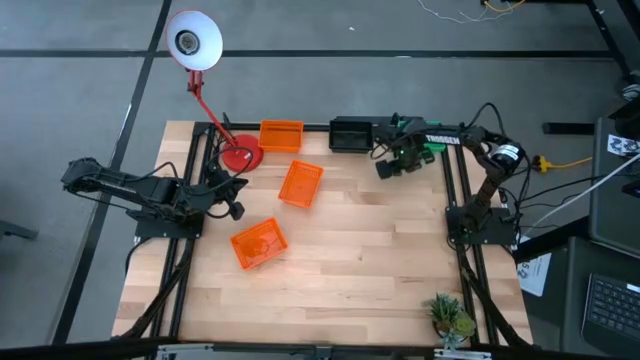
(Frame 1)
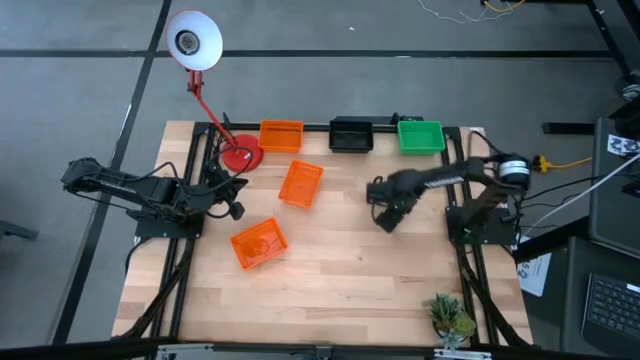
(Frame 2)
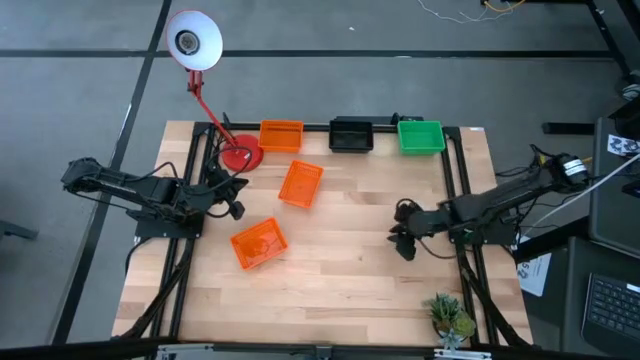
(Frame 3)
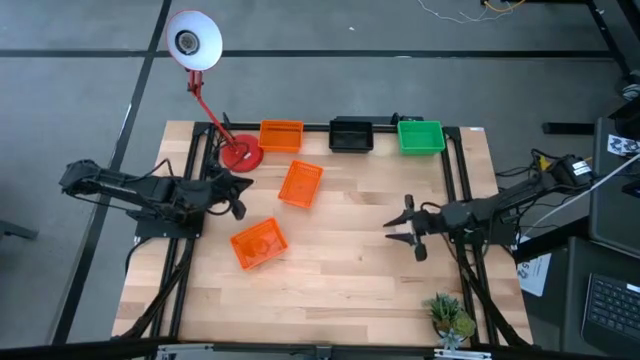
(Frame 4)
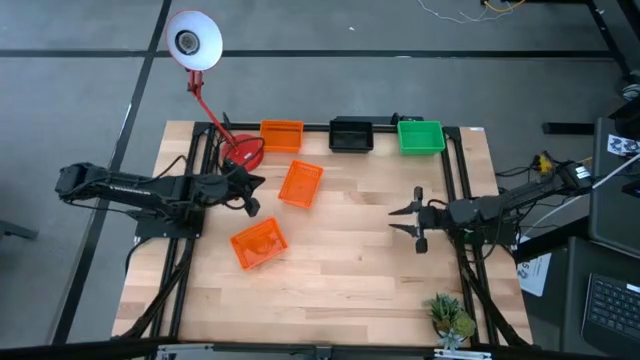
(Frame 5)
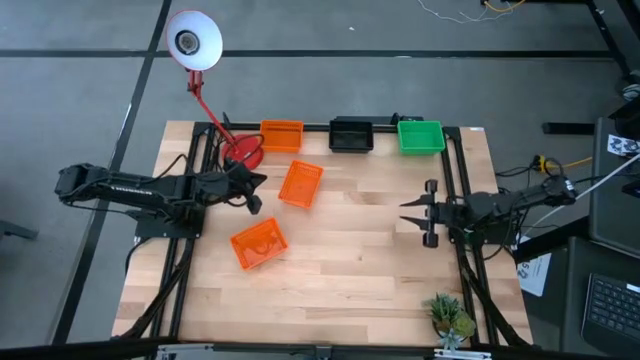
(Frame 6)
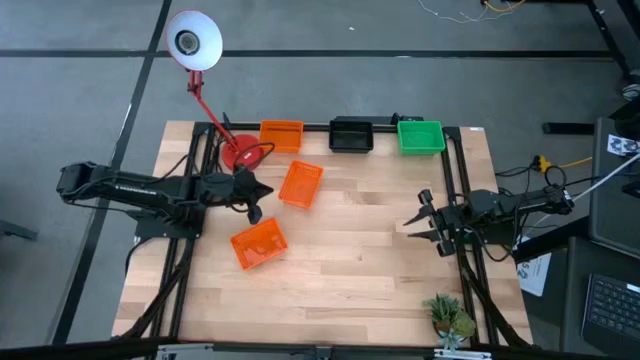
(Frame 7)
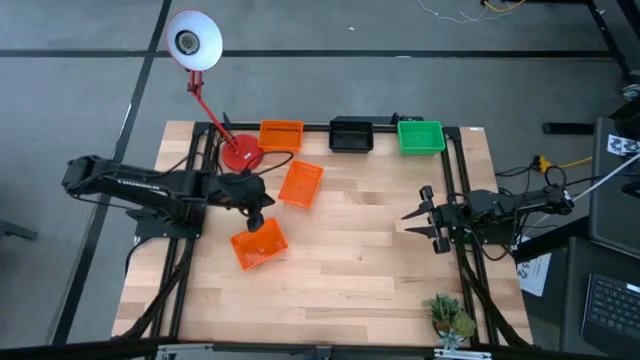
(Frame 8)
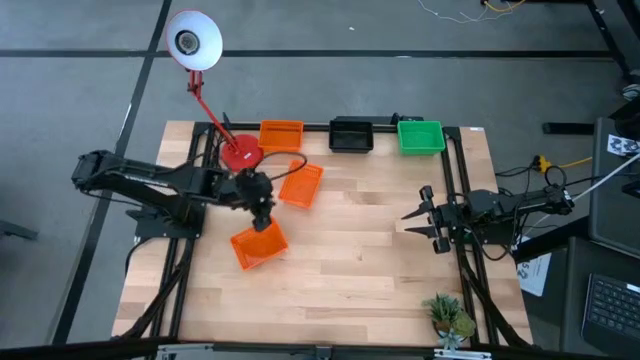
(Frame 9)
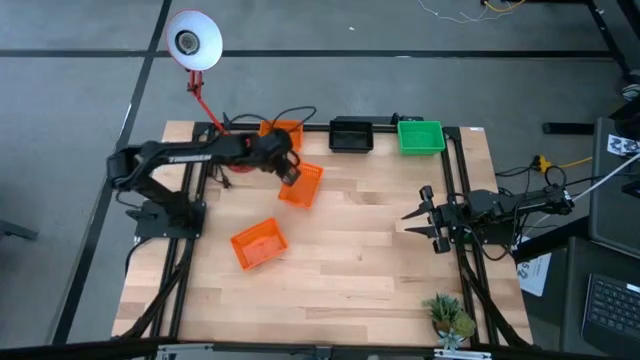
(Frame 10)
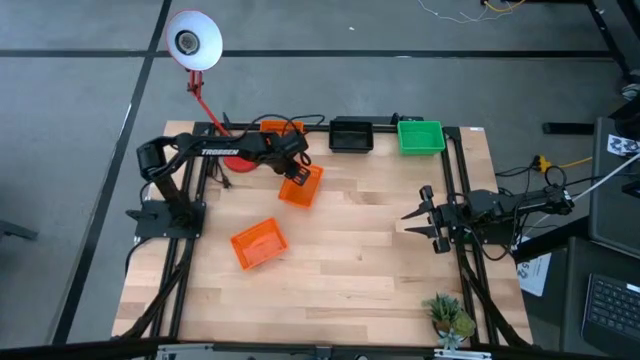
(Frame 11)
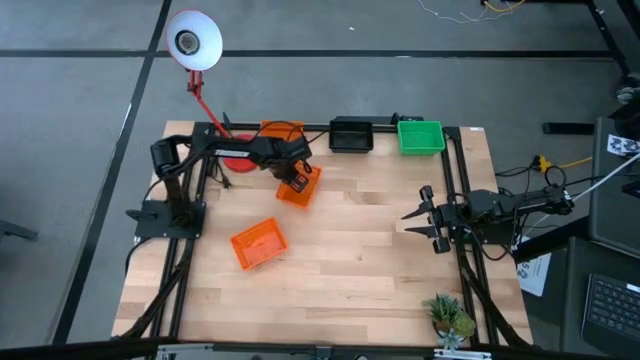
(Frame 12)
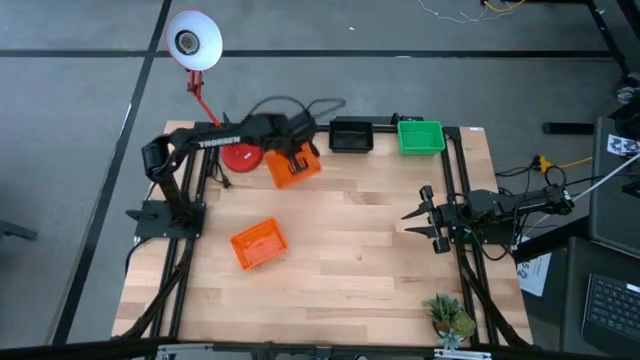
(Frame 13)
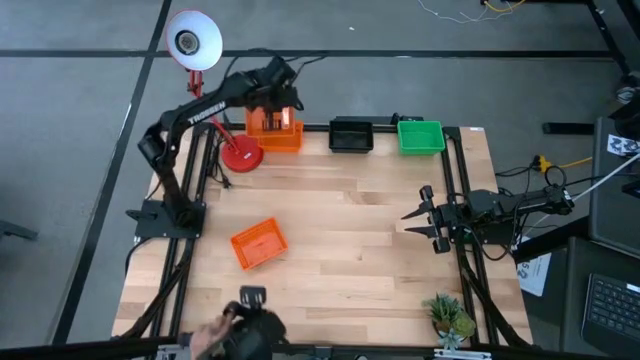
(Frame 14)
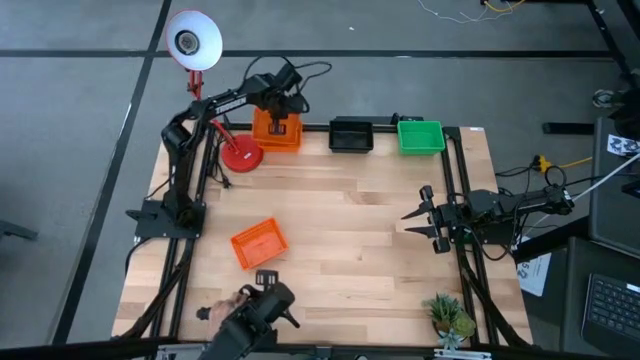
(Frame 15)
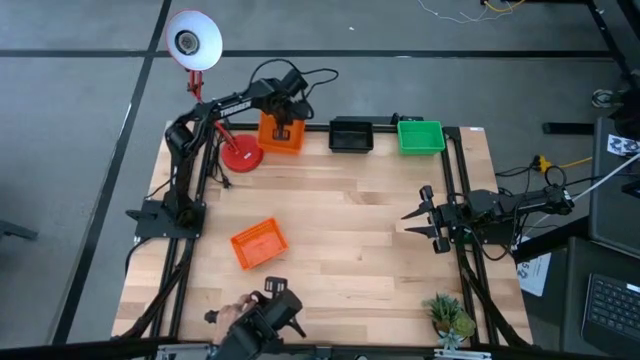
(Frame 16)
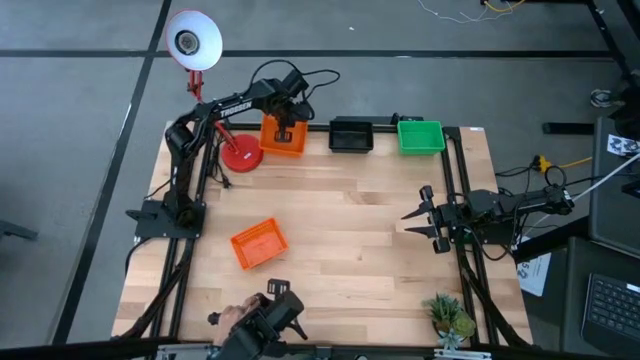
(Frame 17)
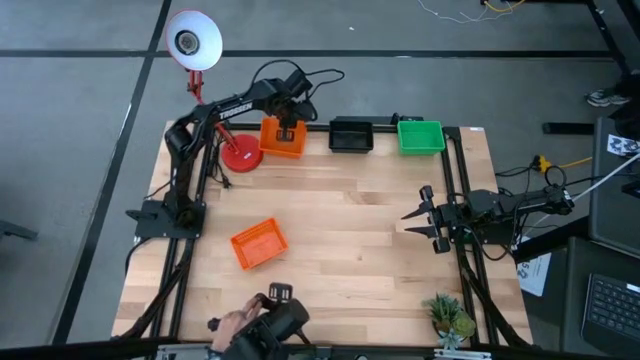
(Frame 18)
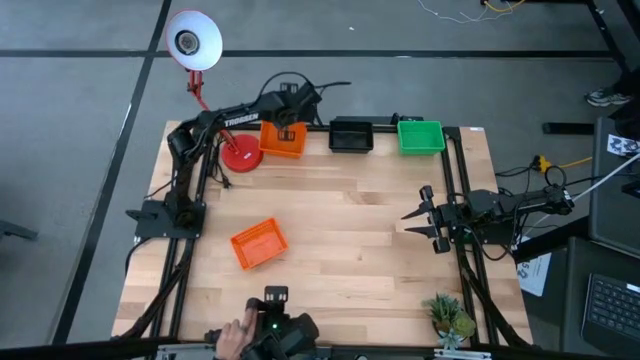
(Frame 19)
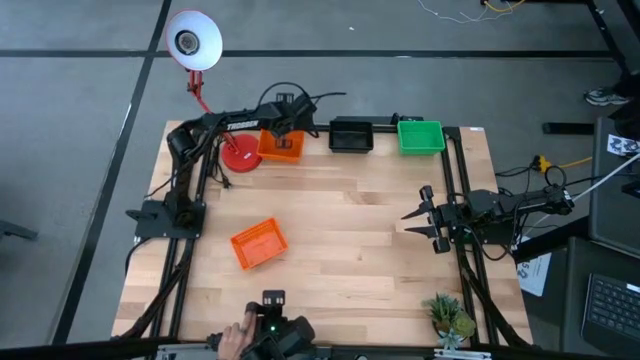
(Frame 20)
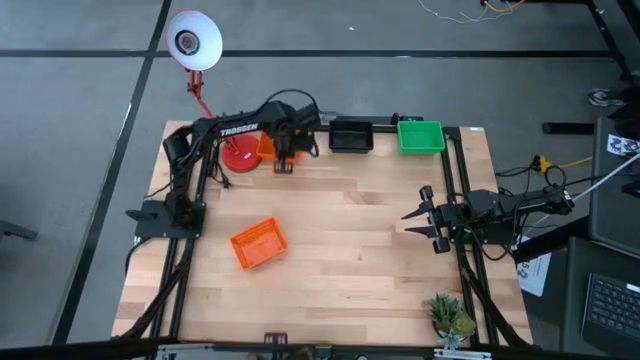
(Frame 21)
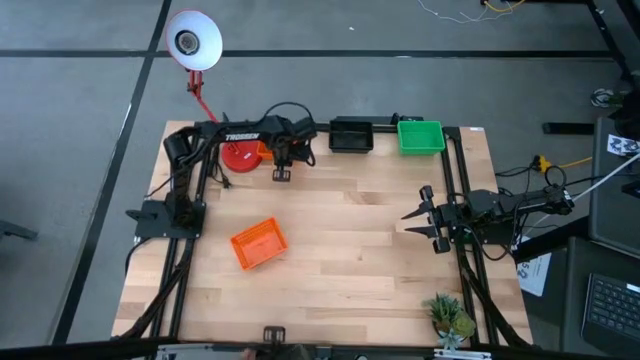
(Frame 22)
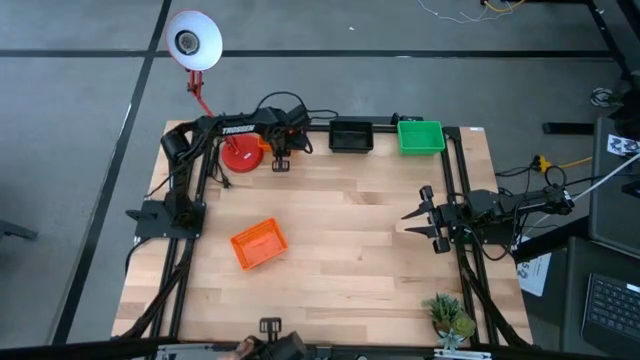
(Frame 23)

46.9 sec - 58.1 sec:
Stack the middle orange bin on top of the top orange bin

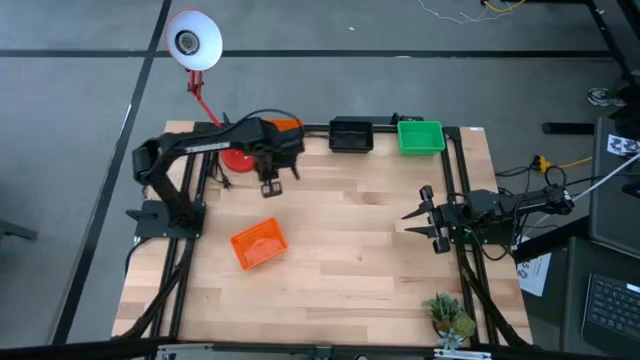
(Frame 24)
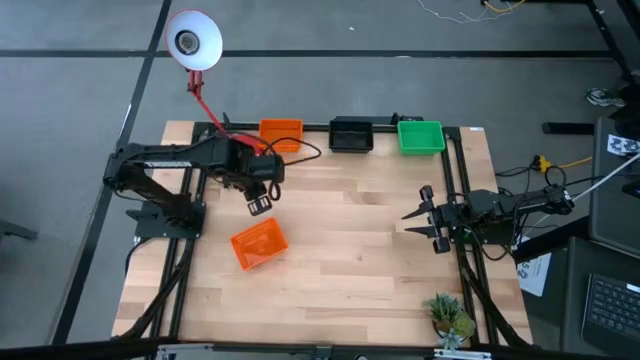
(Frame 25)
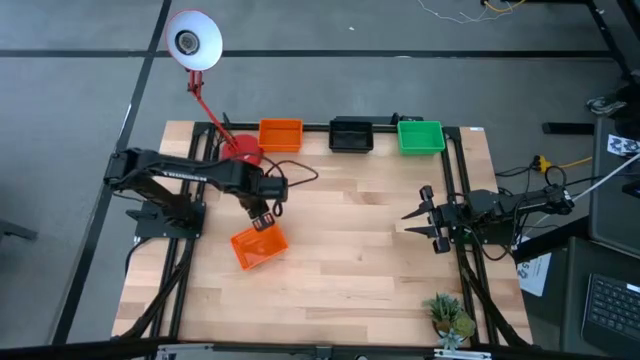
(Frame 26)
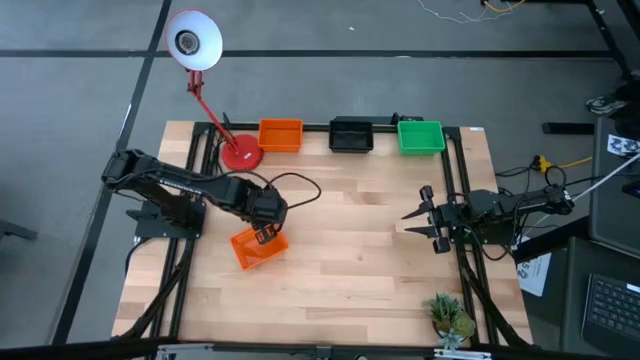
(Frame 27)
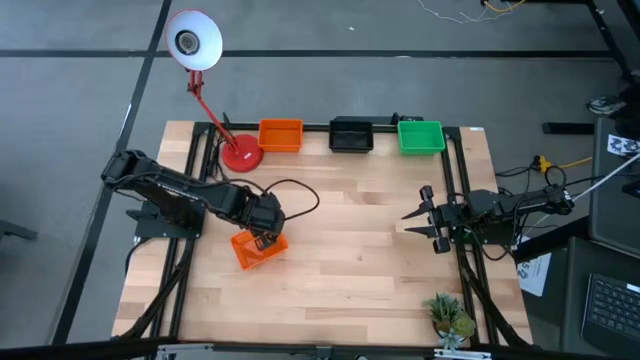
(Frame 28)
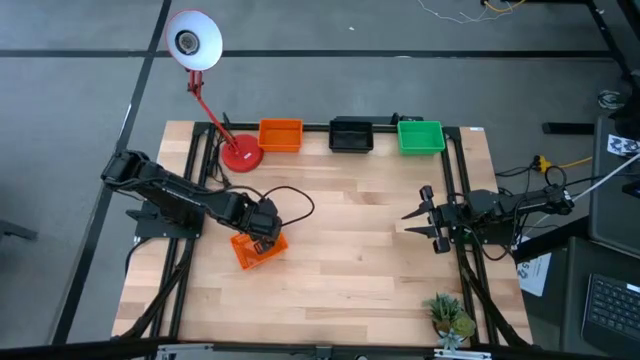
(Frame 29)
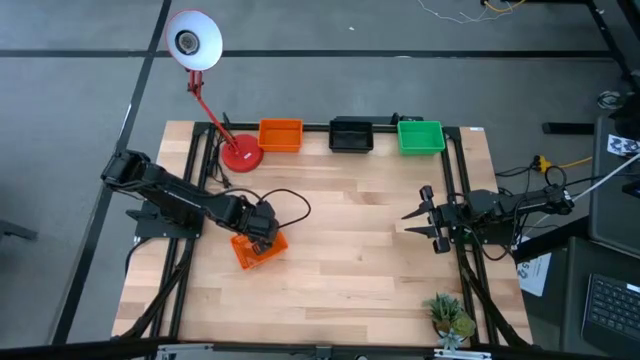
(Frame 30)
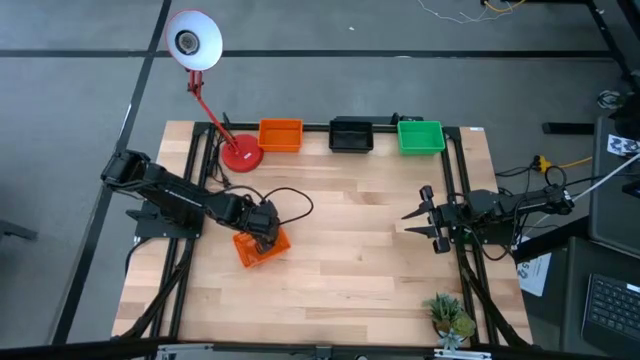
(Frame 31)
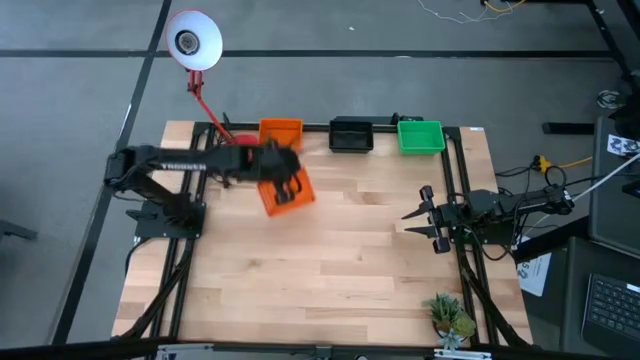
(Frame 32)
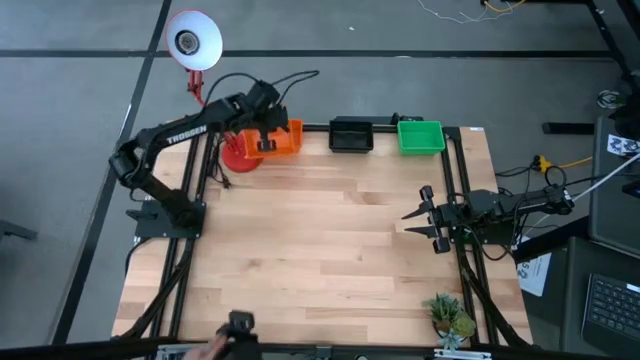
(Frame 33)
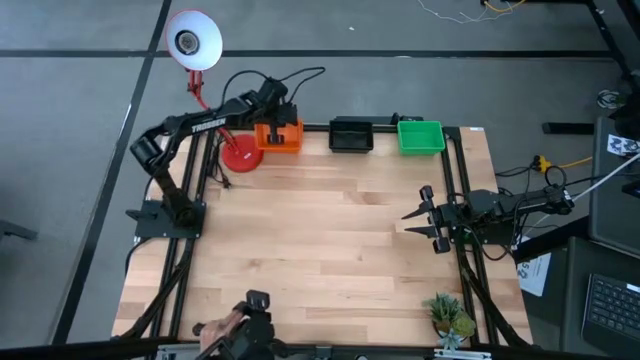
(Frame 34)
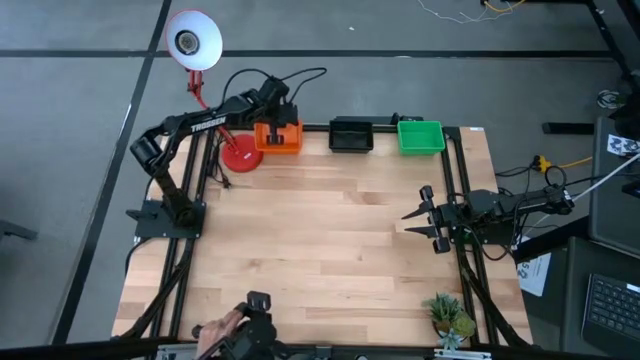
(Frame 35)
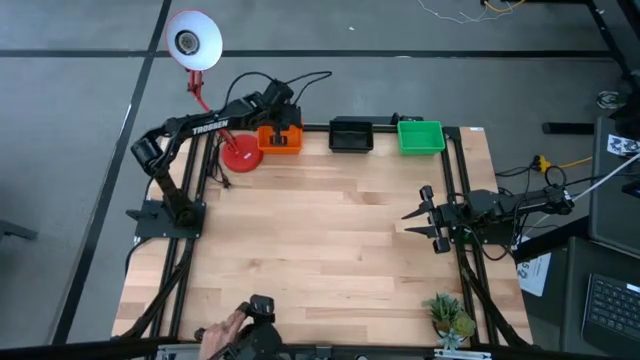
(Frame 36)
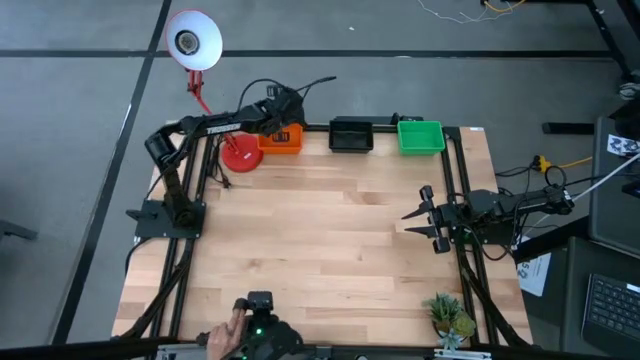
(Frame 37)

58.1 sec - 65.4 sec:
Stack the bottom orange bin on top of the stacked orange bin
